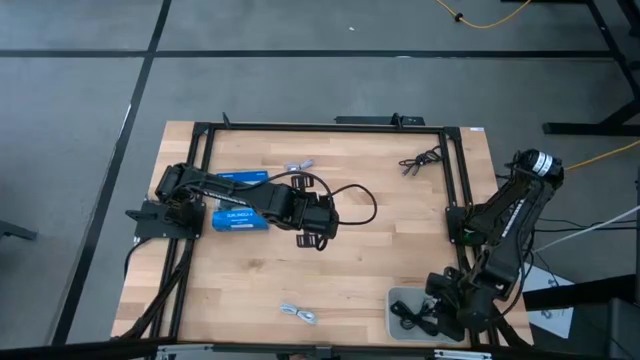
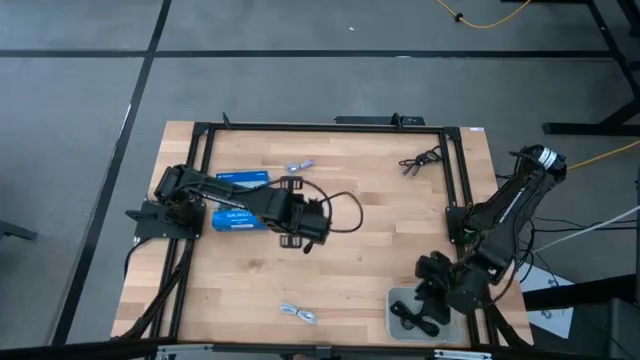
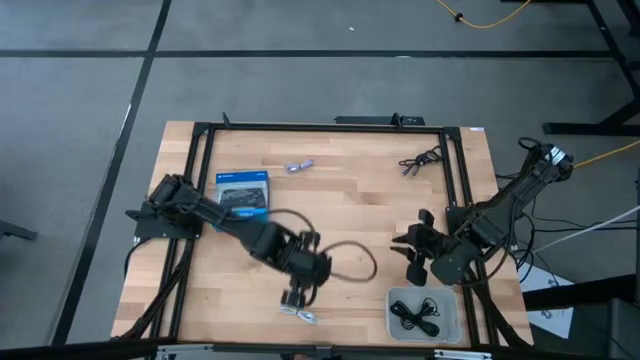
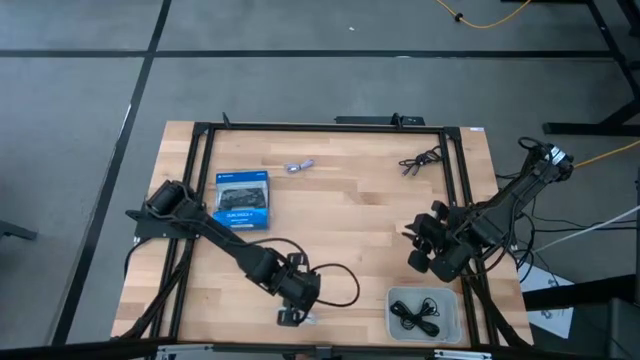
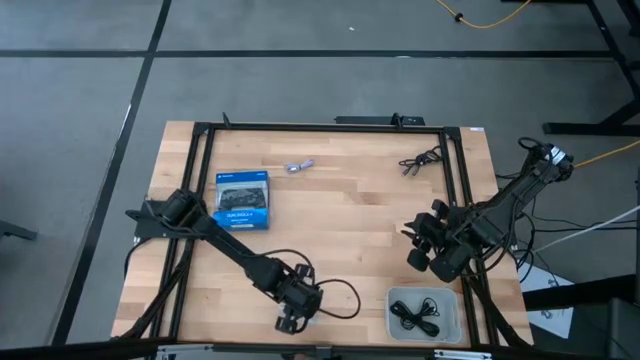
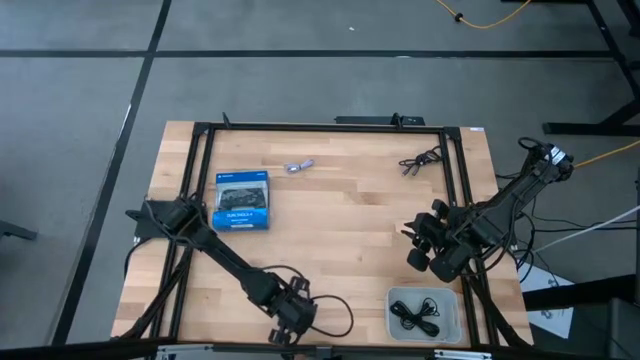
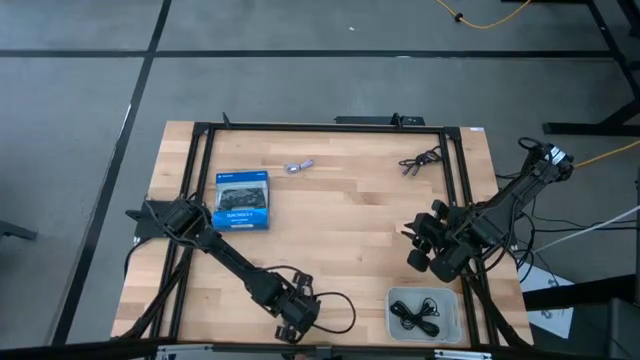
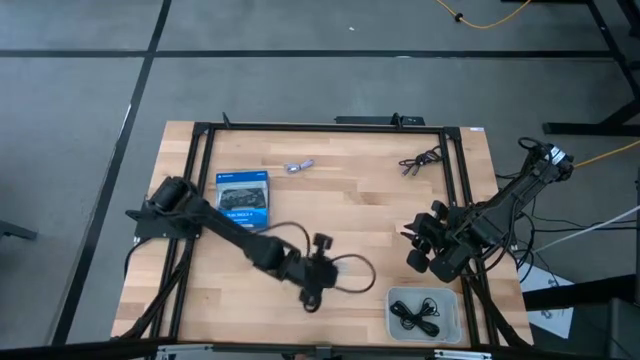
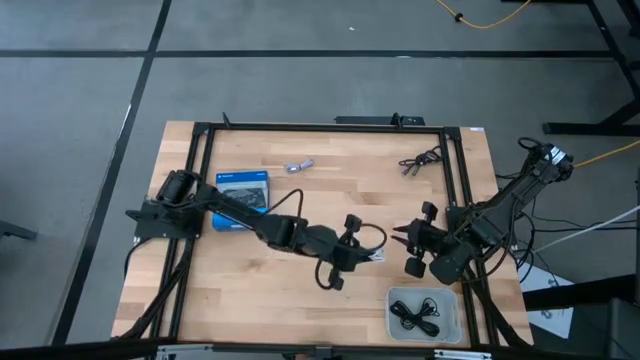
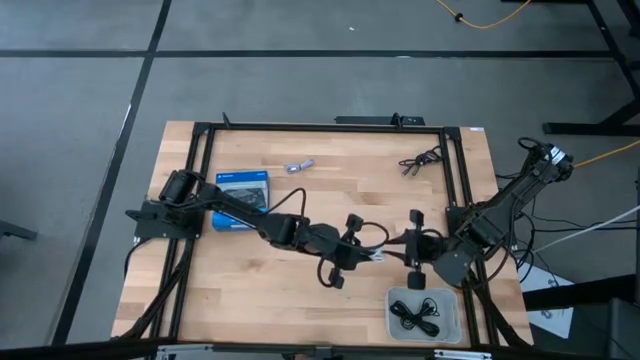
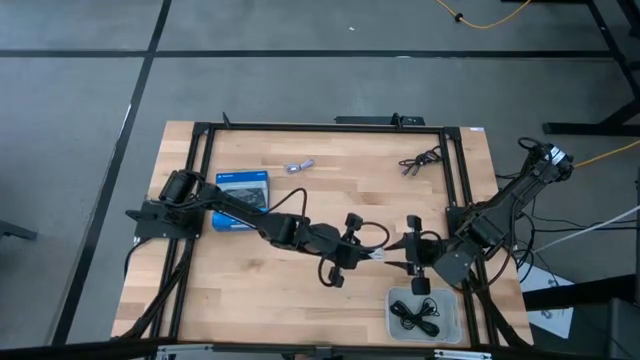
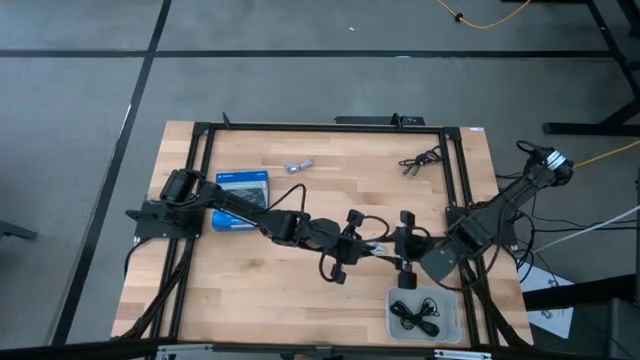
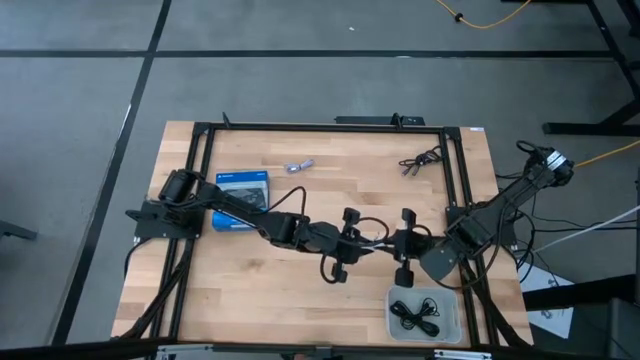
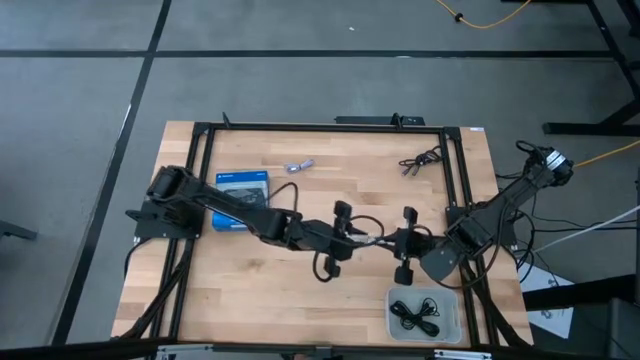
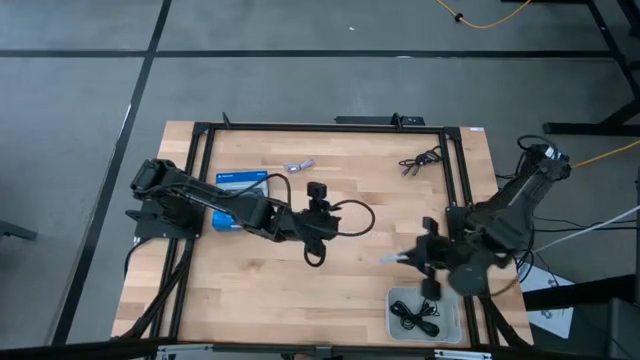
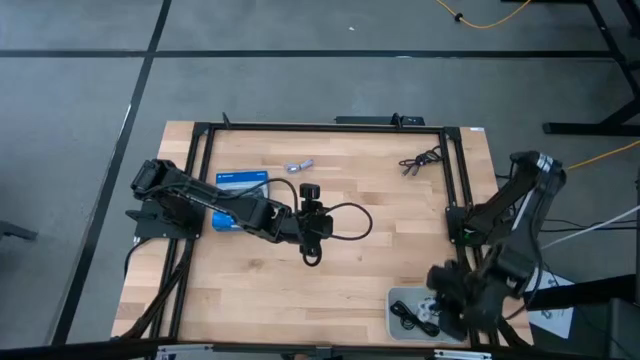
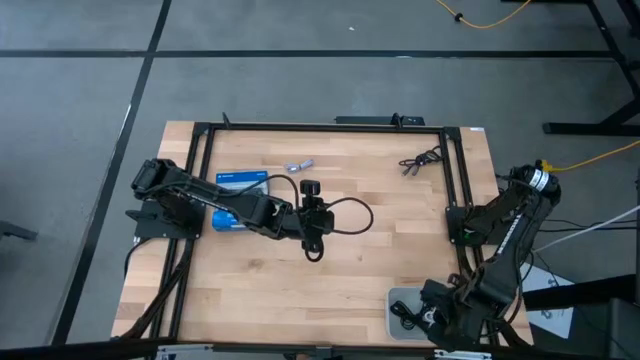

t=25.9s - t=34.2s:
Task: Pick and place USB-C Cables
Put the white charger cable into the white bin

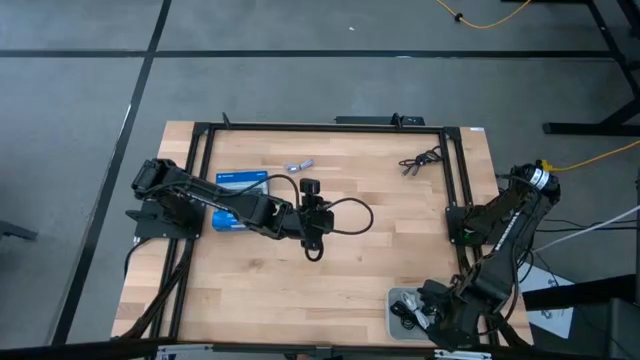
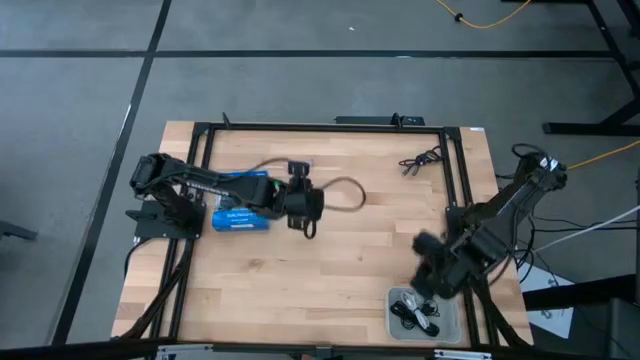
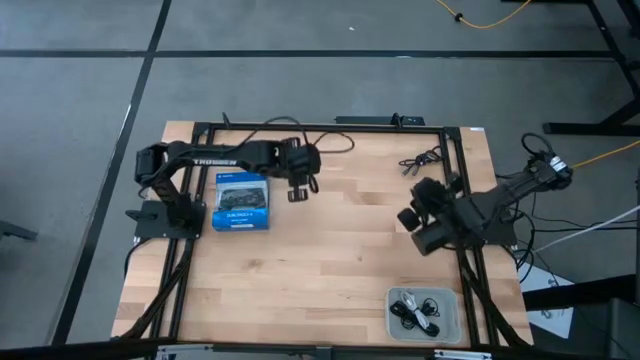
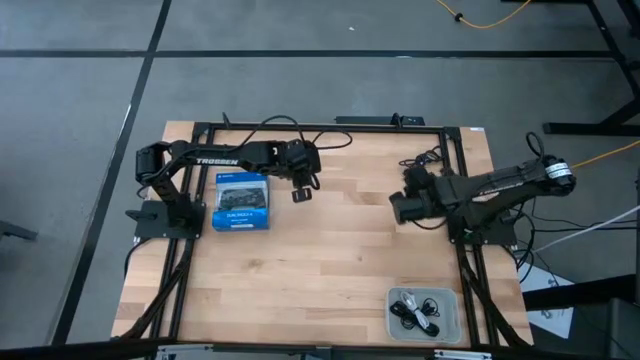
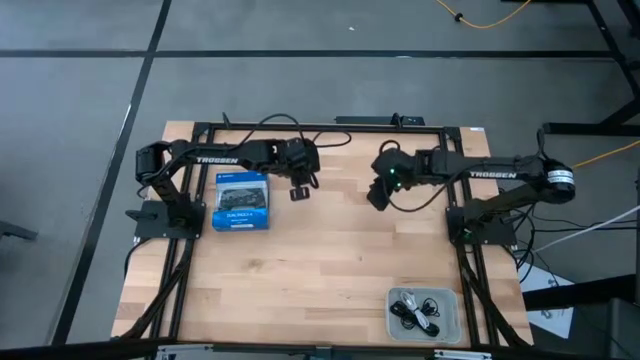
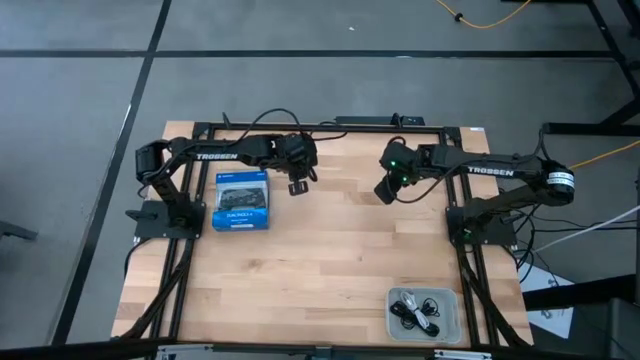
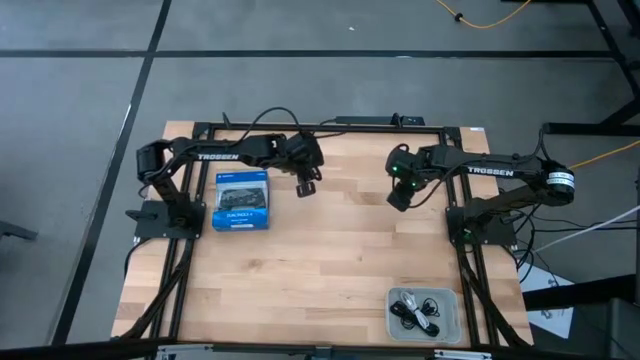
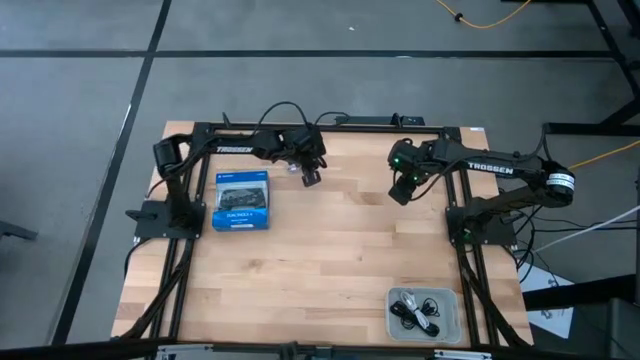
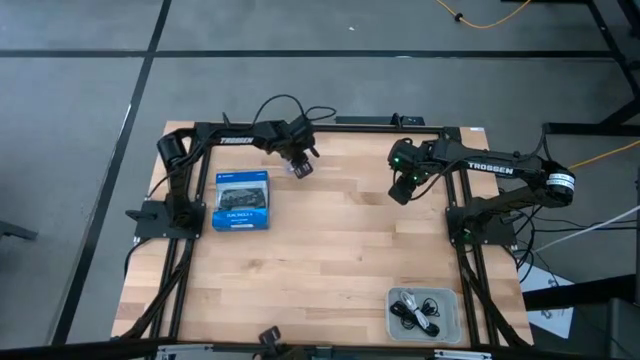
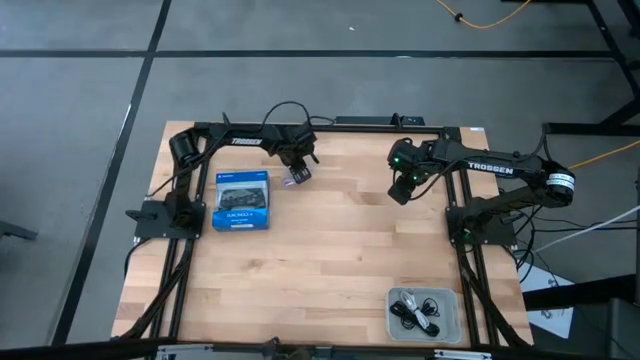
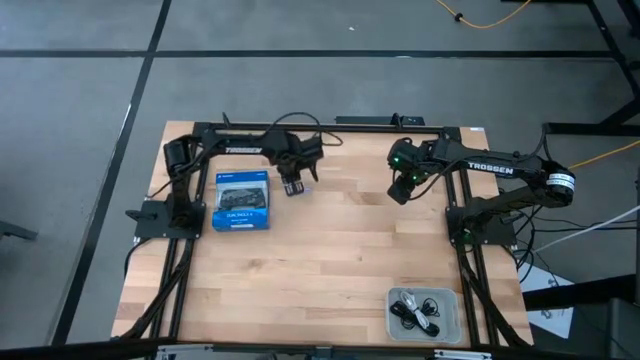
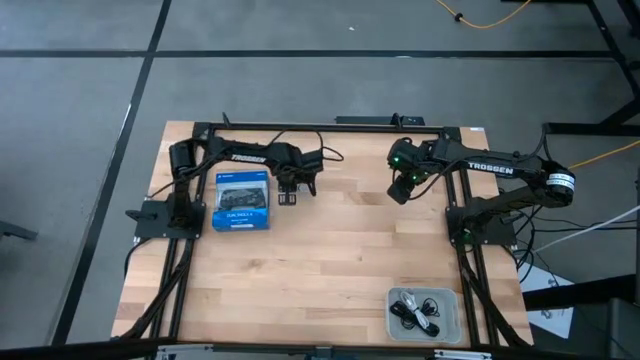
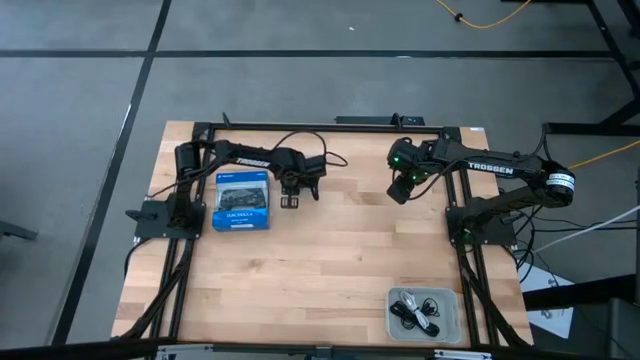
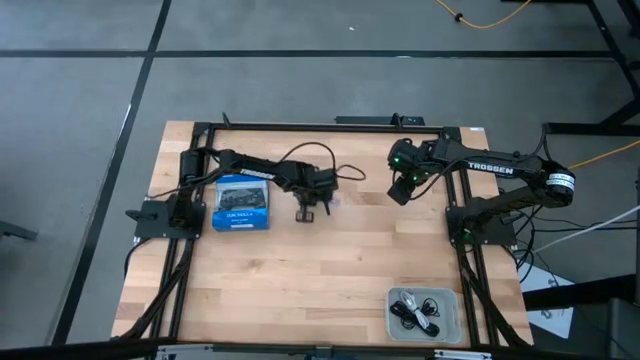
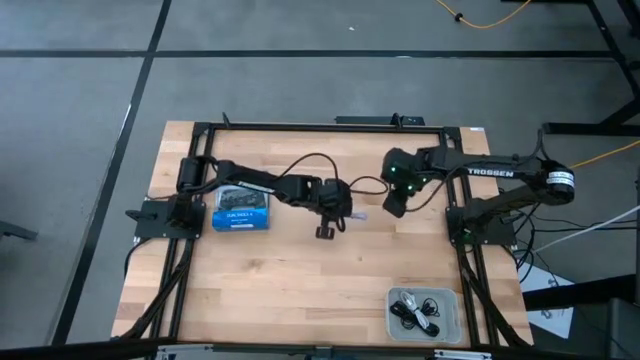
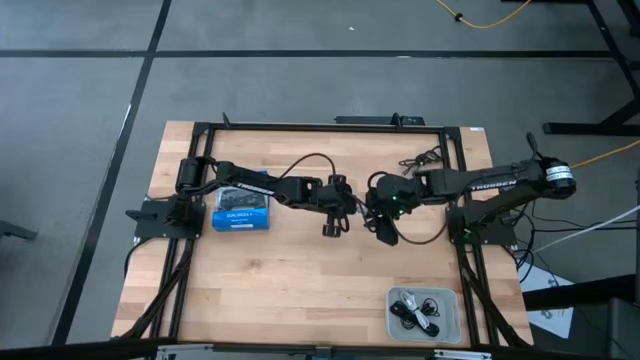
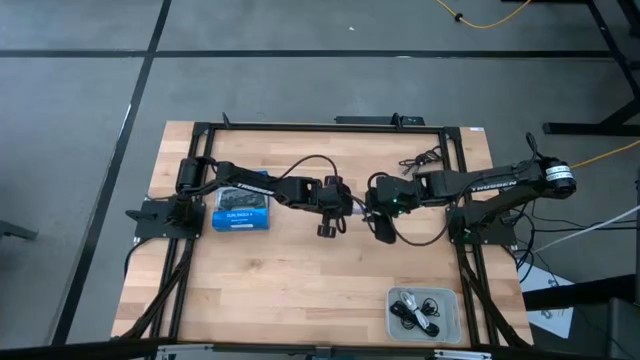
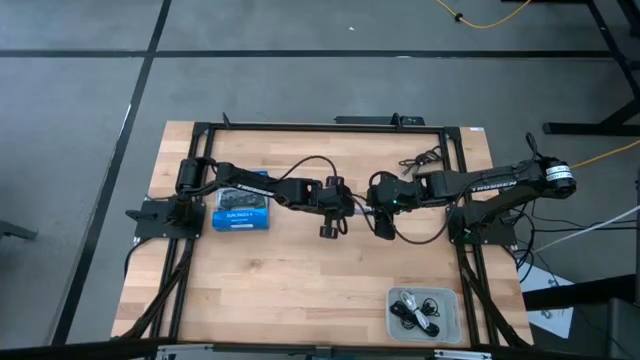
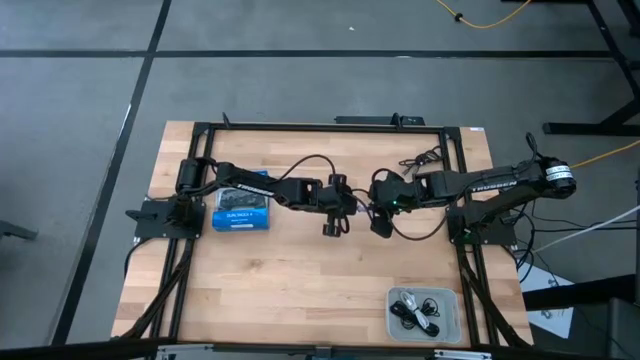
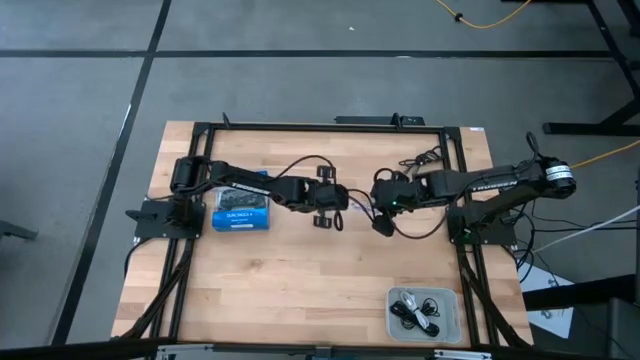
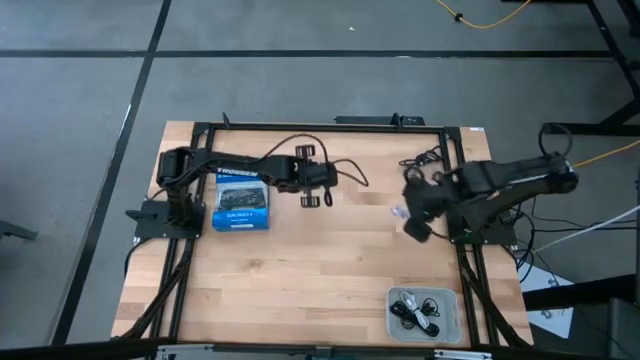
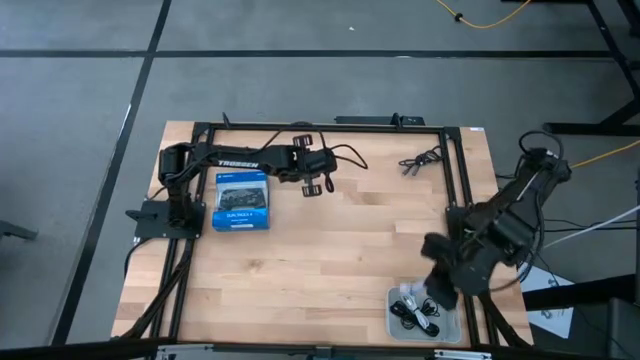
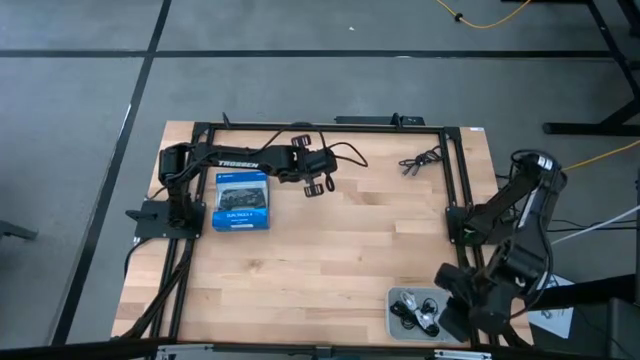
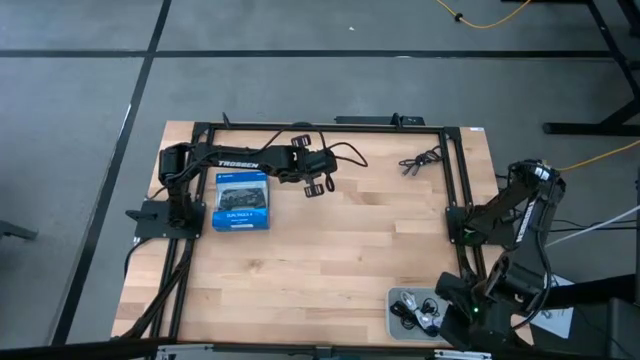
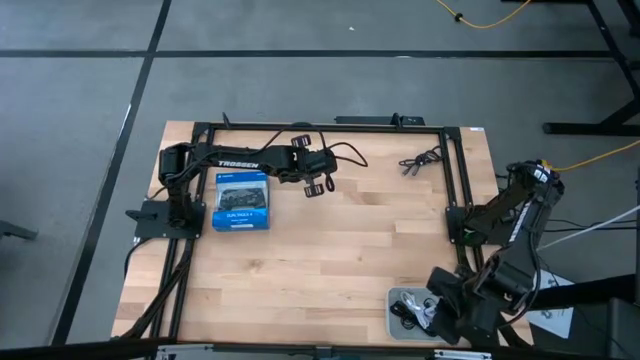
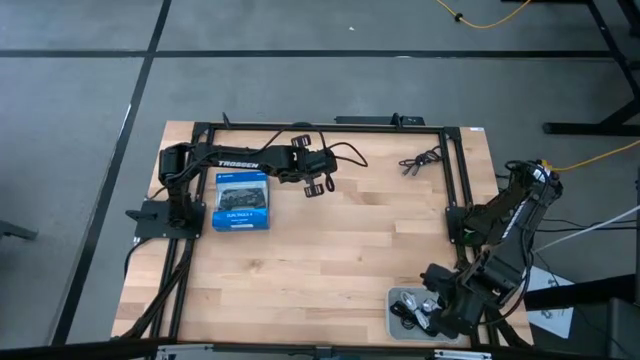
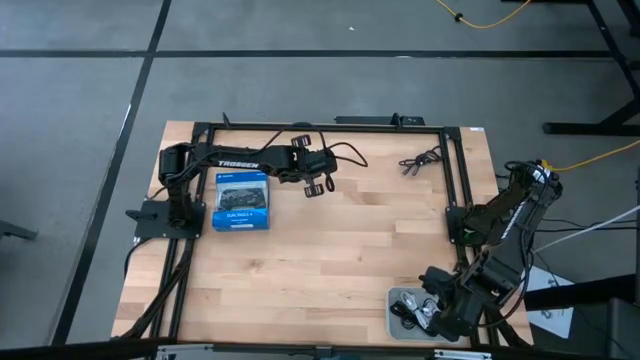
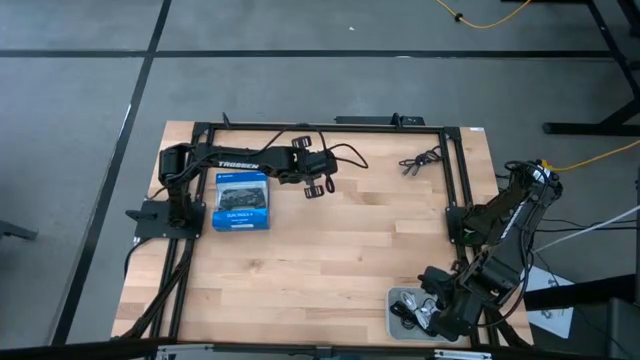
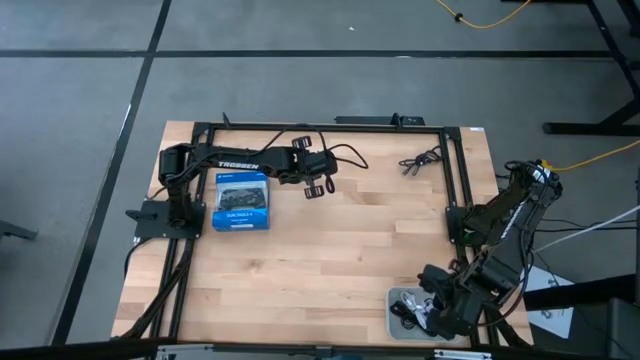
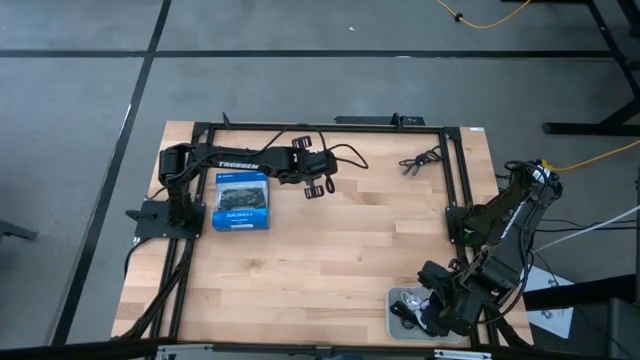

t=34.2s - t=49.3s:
Put the purple charge cable into the white bin
